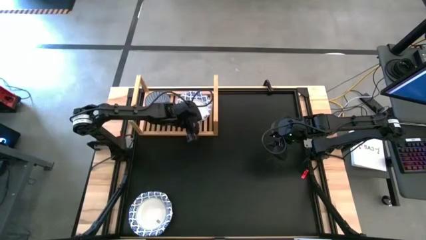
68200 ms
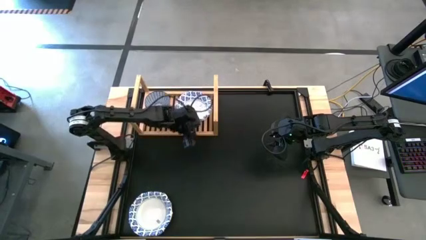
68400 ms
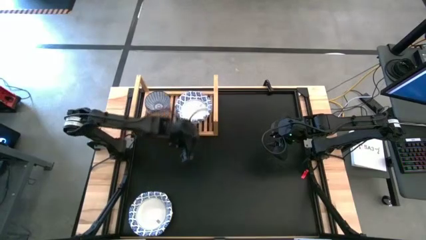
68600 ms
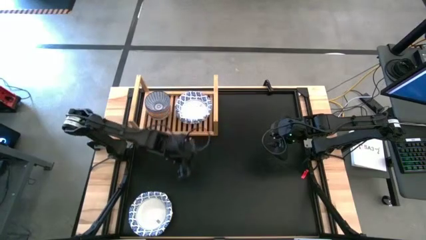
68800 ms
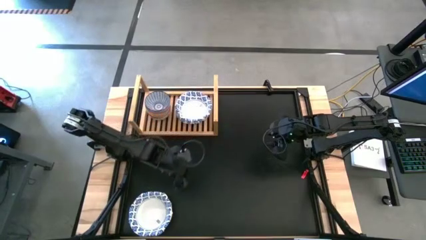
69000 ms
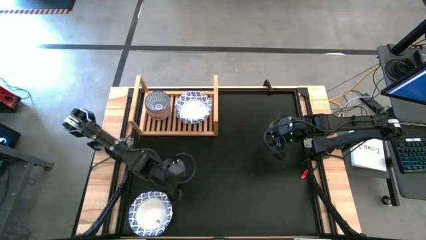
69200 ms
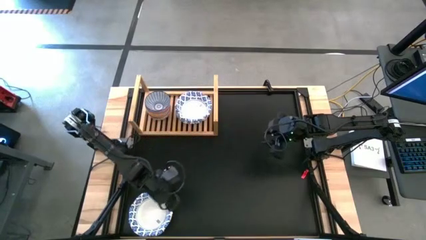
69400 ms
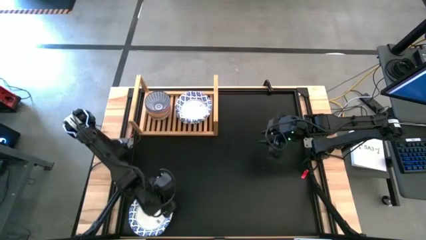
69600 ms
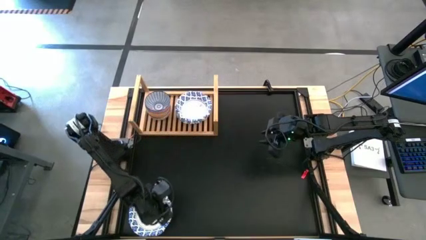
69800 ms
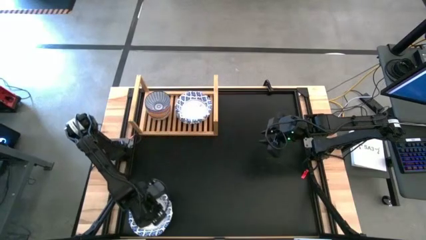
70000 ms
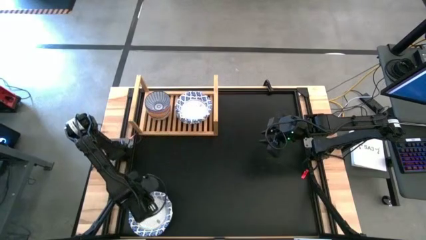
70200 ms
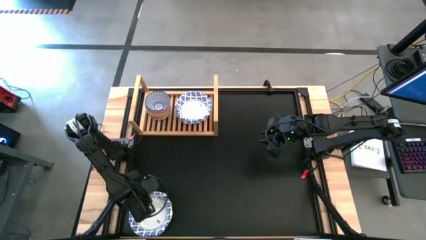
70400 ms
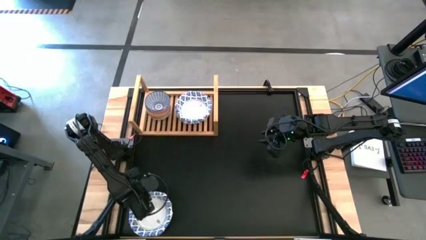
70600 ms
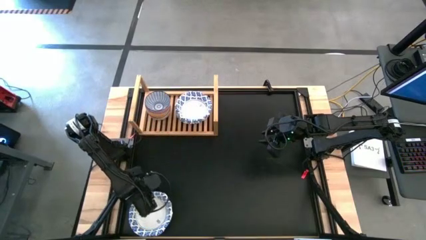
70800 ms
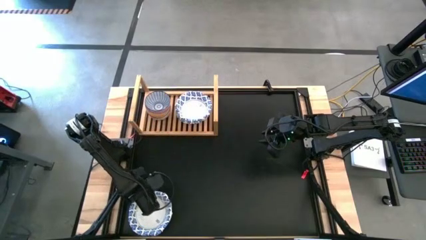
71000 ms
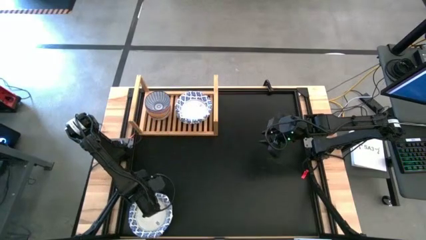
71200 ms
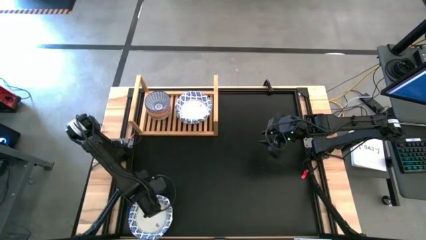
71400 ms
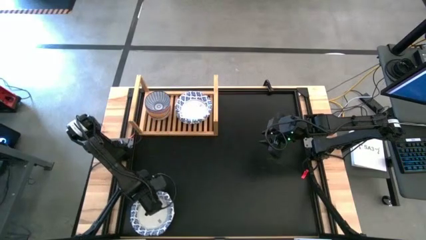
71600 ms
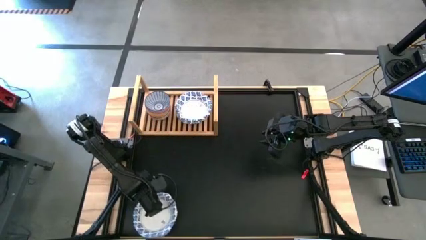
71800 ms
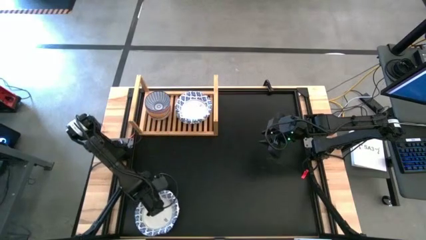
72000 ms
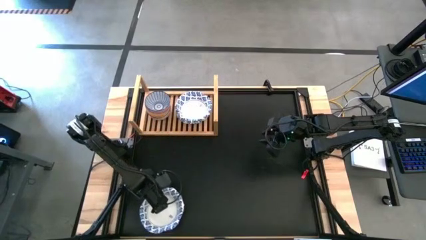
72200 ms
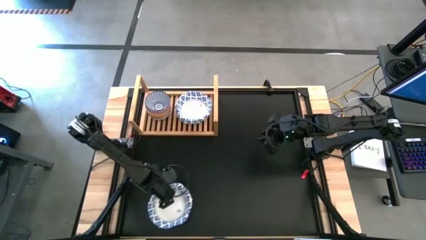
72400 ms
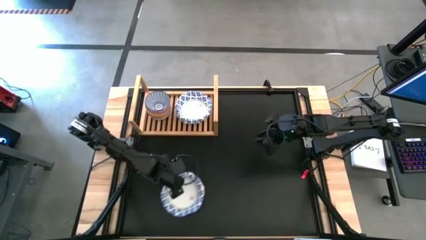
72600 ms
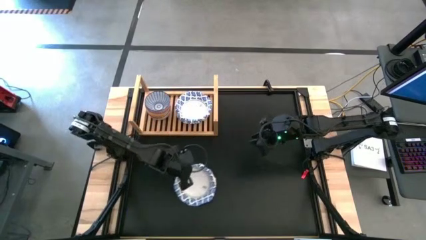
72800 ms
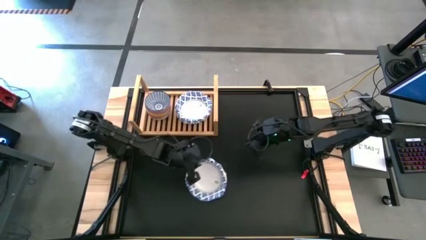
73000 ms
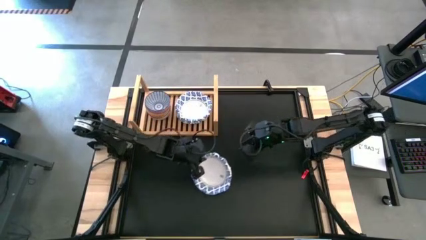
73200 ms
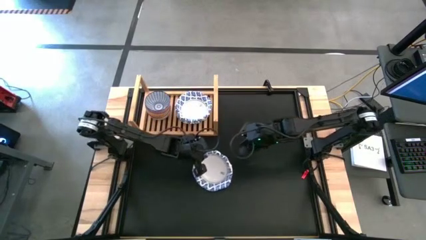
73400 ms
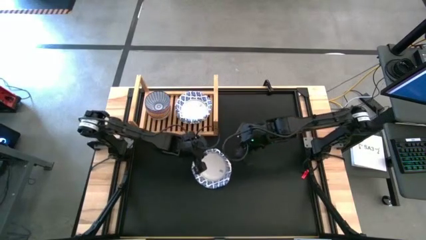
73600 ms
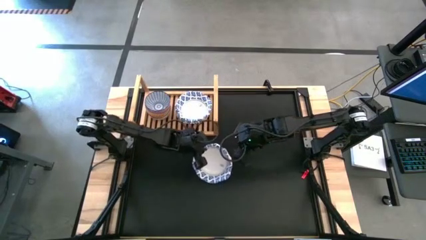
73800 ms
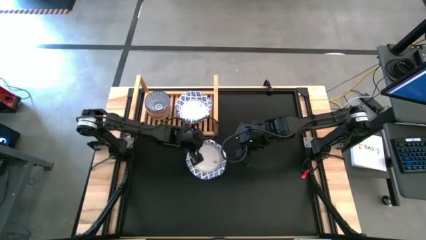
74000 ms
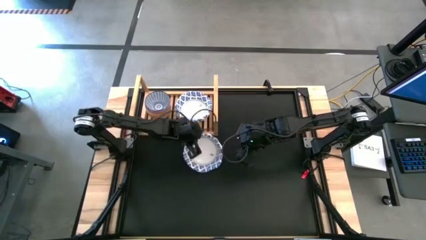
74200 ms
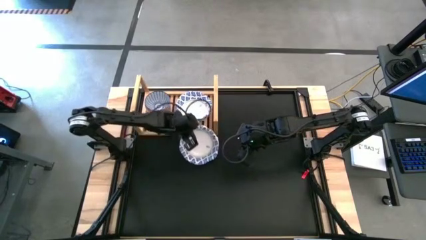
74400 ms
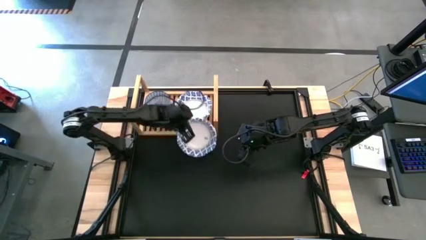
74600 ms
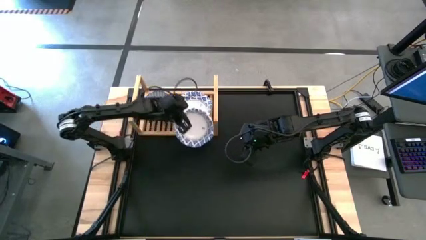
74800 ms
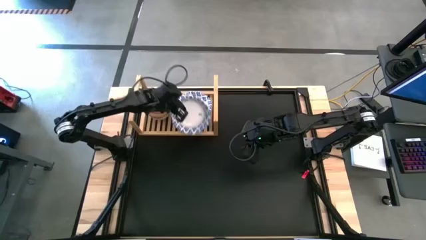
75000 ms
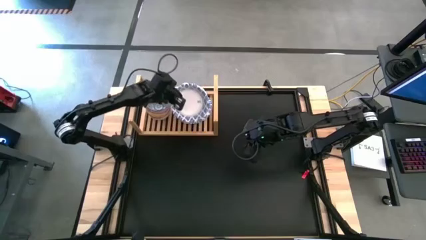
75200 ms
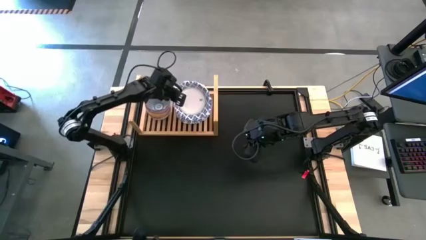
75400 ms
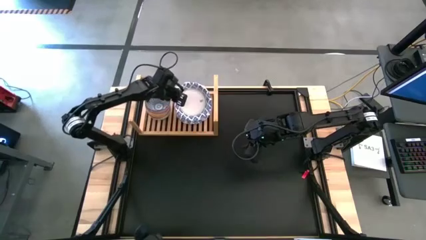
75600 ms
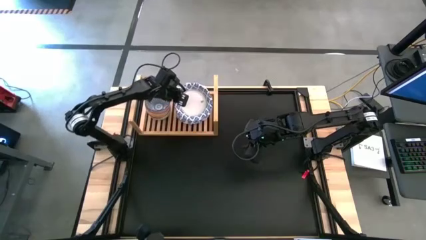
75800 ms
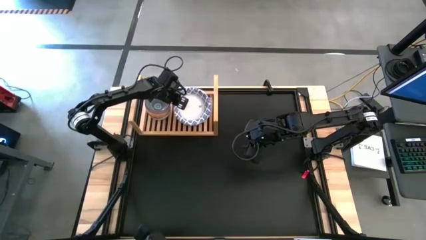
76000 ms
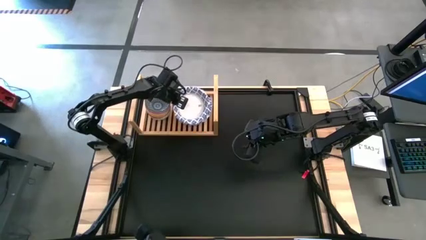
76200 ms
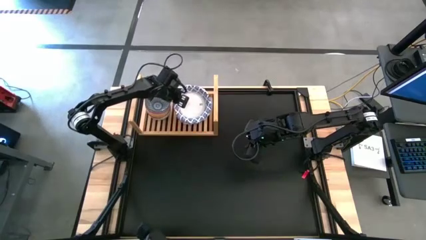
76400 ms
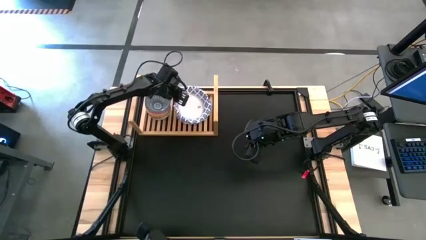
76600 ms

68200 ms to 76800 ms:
Task: Place and stack bowls onto a shelf
Stack the white bowl on top of the white bowl on the shelf

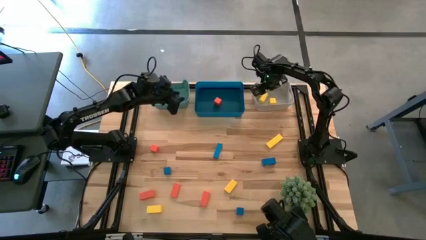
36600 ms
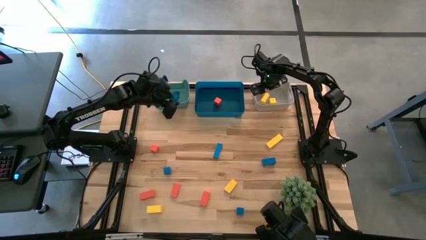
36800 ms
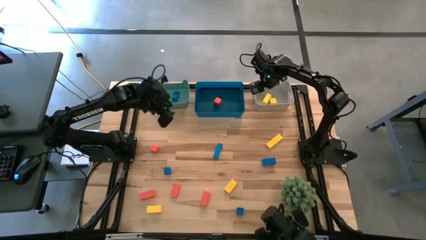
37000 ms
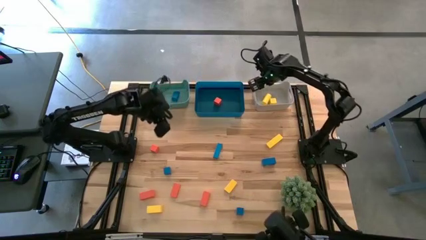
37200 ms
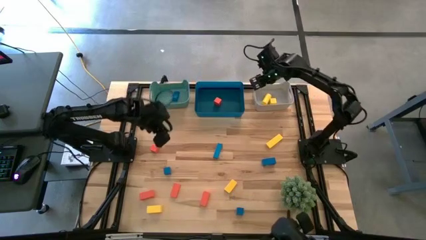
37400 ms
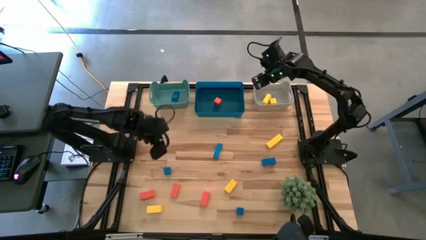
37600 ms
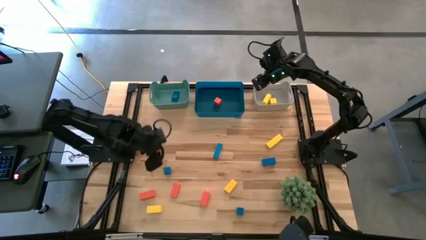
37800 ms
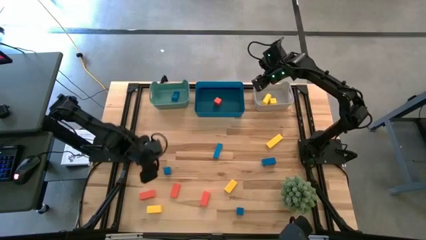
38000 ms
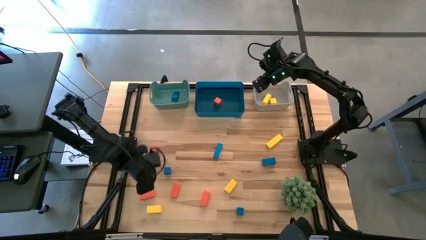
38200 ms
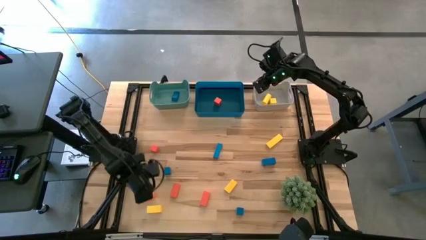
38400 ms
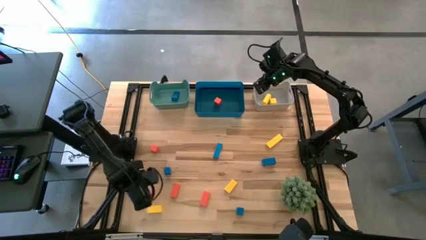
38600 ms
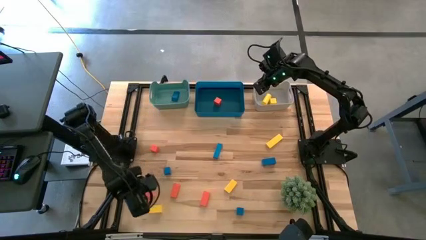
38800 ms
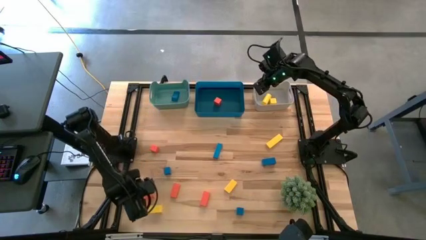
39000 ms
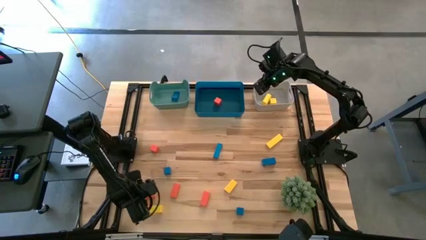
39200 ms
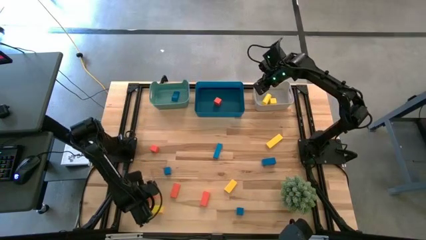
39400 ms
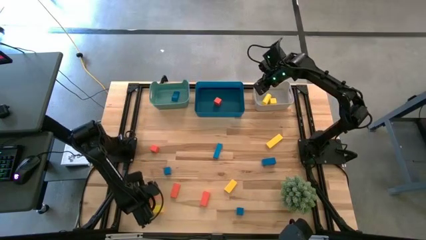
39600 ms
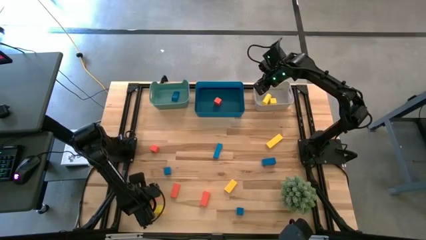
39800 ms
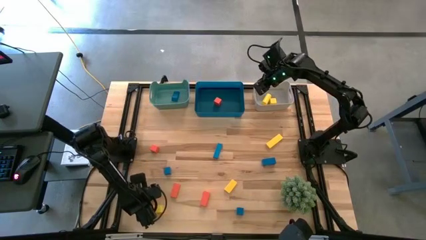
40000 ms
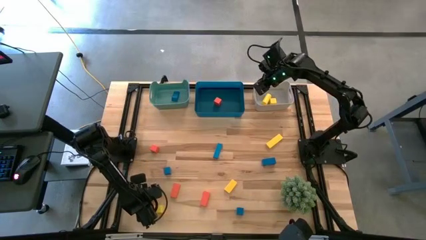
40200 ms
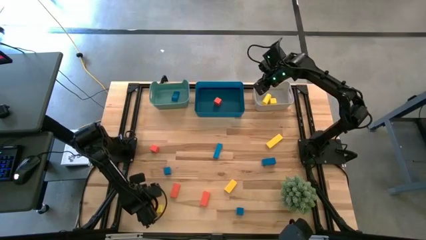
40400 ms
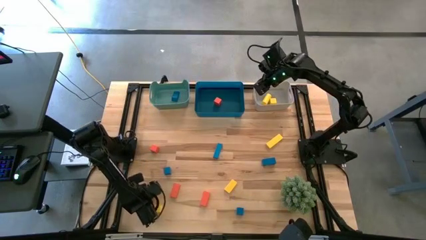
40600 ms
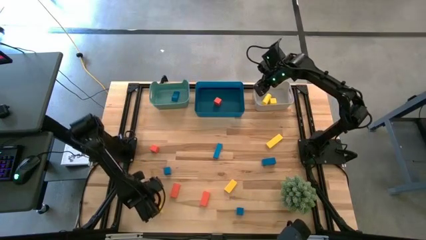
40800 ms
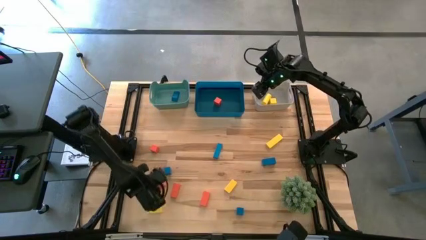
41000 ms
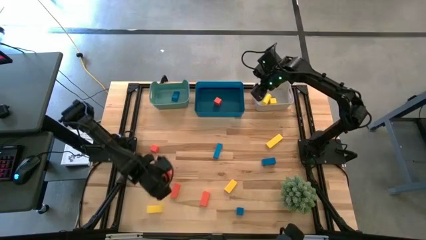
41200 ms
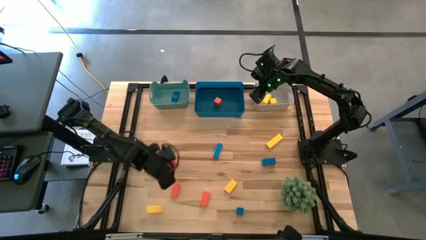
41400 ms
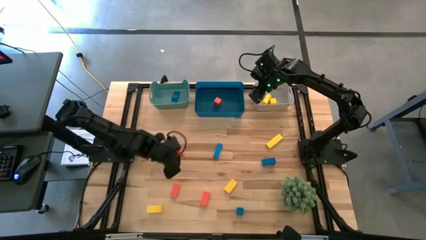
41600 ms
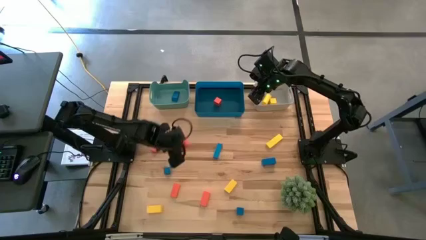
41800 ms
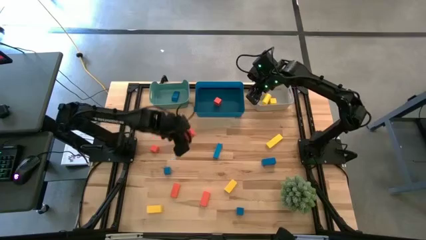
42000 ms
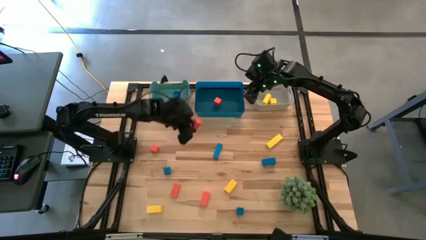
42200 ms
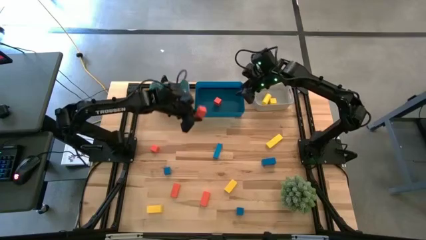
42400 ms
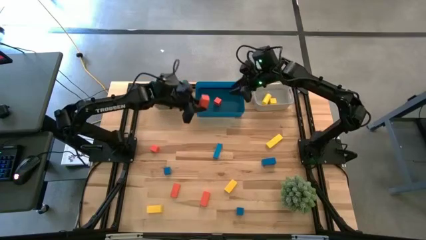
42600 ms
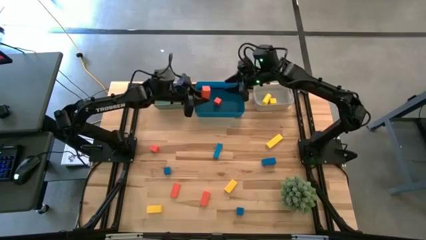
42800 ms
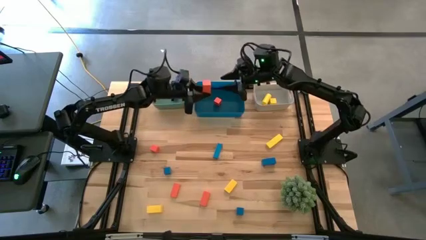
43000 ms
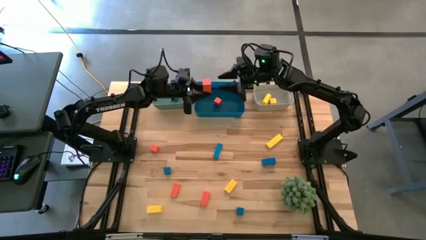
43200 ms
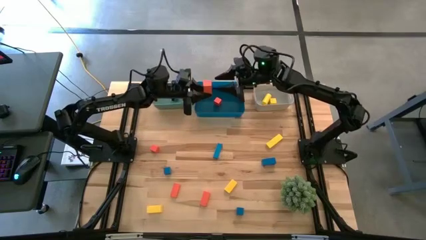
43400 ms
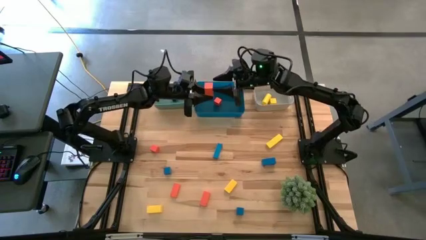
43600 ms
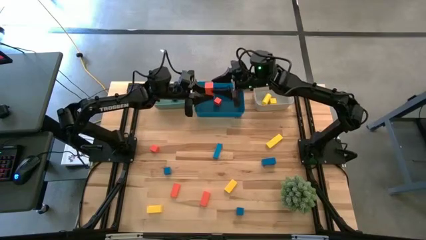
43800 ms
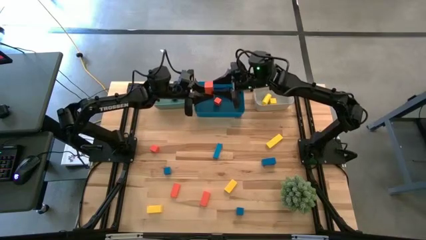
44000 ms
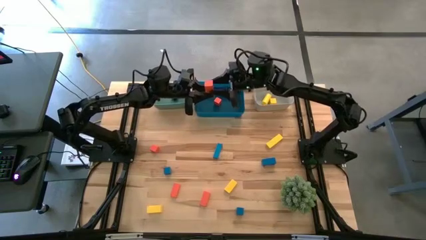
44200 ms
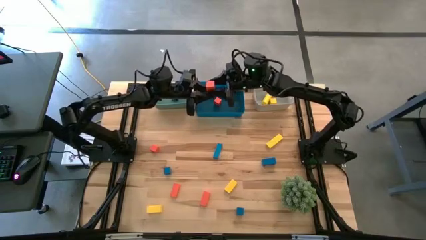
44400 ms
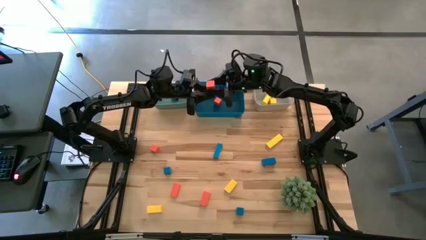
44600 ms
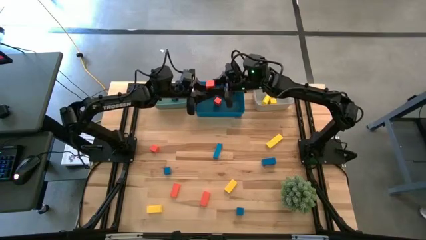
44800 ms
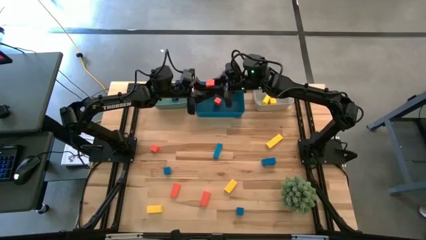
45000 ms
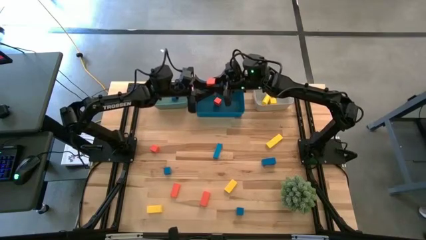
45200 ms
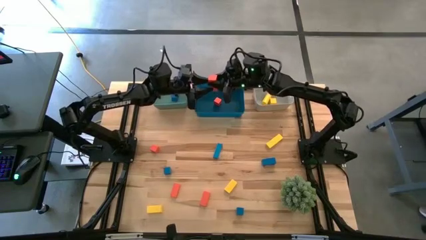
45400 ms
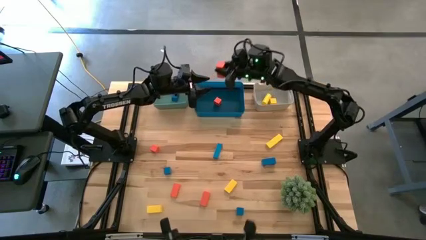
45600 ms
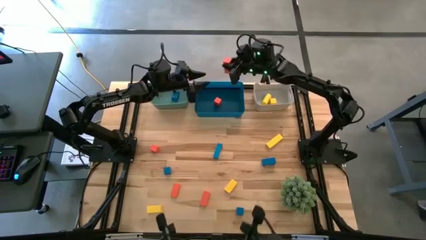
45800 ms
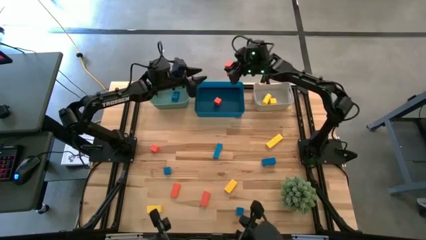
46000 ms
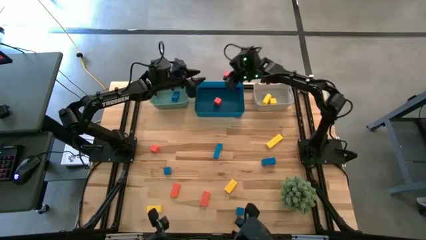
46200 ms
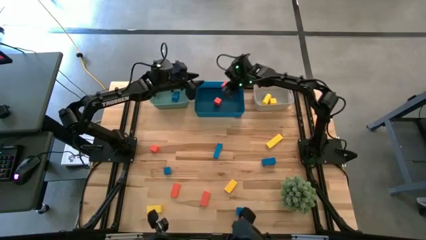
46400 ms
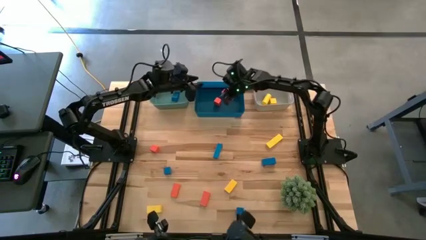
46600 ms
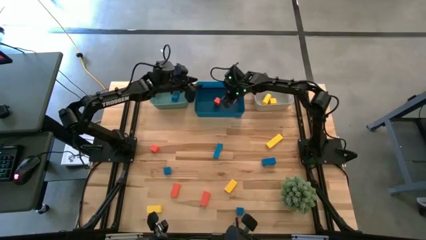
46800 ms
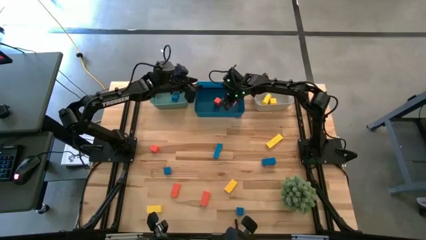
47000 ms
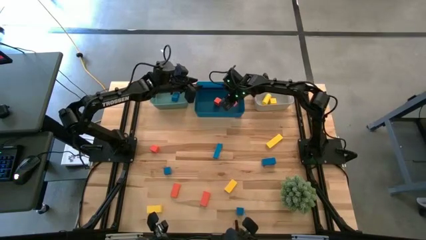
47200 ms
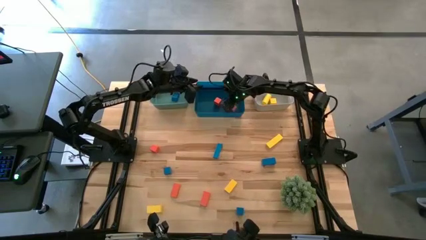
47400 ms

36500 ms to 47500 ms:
Task: Sort & place blocks by color
Put the orange block into the blue bin
